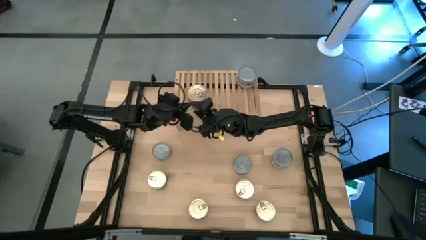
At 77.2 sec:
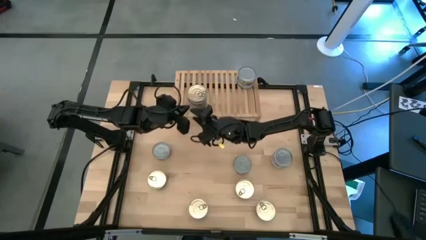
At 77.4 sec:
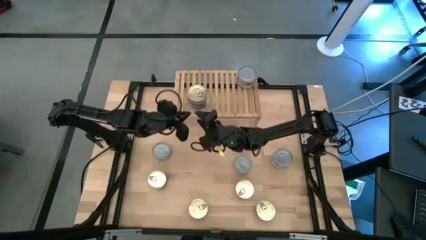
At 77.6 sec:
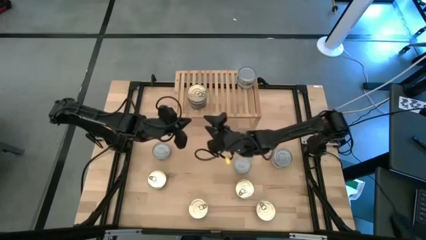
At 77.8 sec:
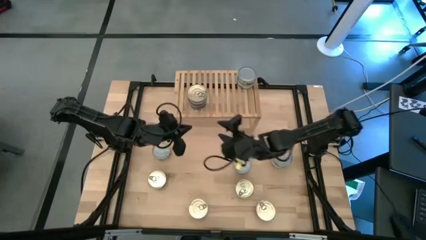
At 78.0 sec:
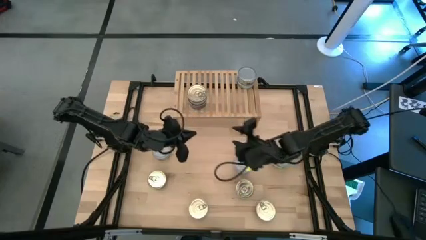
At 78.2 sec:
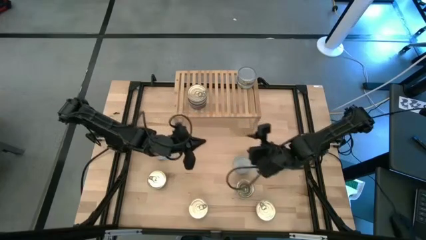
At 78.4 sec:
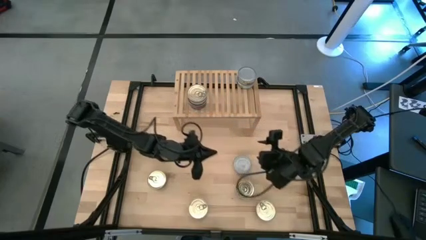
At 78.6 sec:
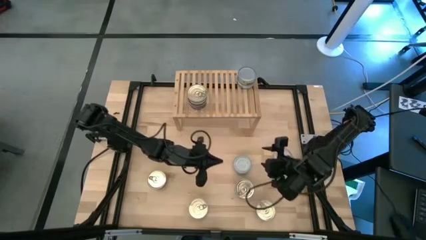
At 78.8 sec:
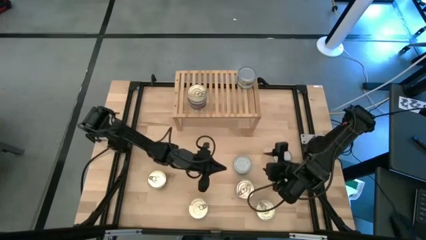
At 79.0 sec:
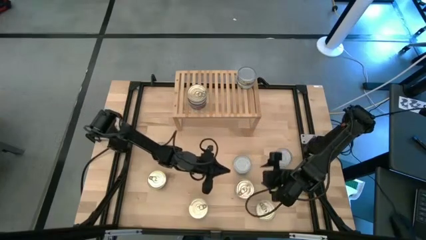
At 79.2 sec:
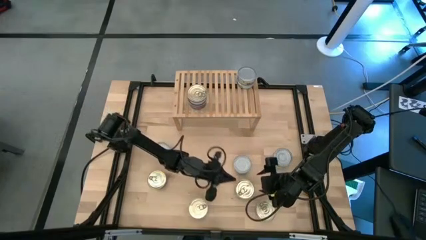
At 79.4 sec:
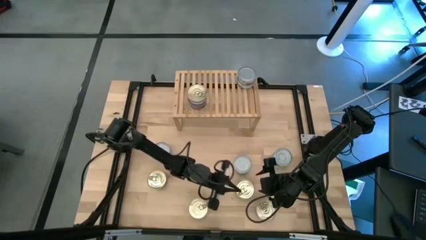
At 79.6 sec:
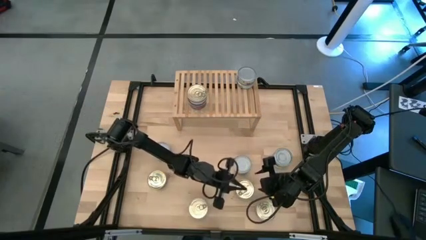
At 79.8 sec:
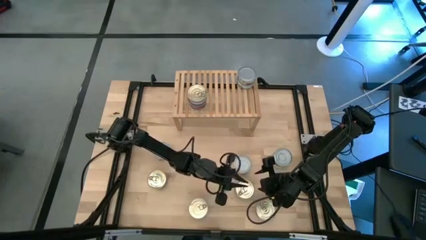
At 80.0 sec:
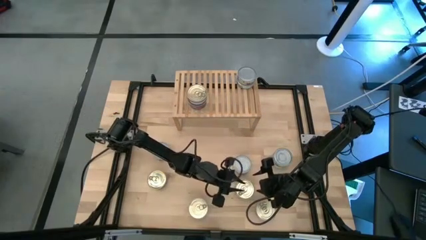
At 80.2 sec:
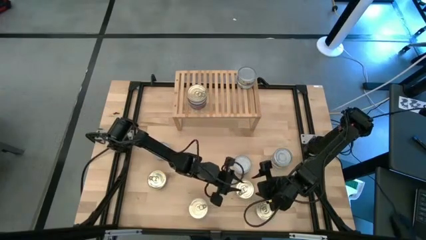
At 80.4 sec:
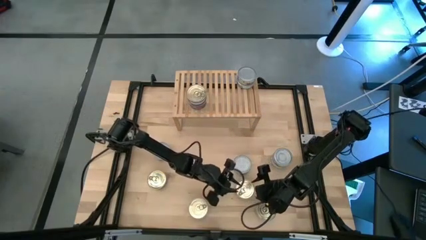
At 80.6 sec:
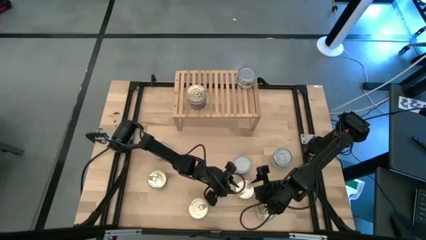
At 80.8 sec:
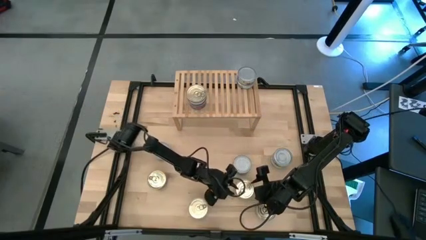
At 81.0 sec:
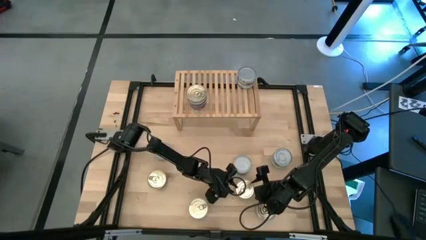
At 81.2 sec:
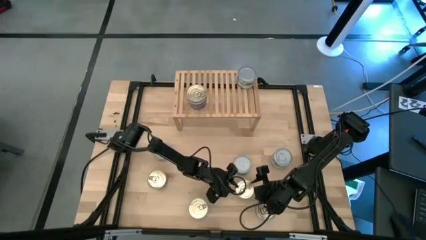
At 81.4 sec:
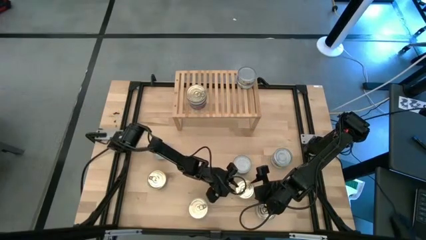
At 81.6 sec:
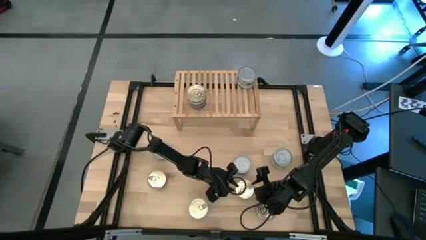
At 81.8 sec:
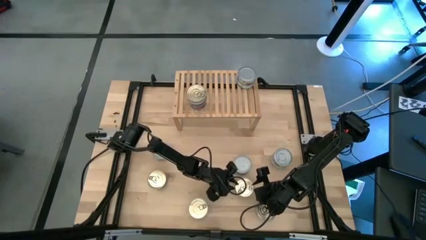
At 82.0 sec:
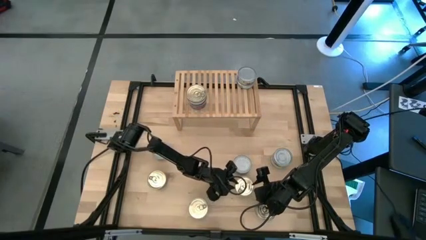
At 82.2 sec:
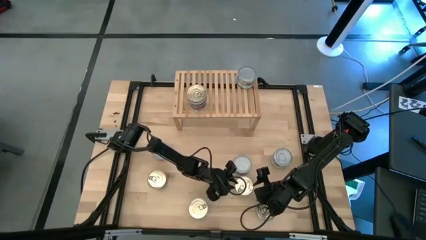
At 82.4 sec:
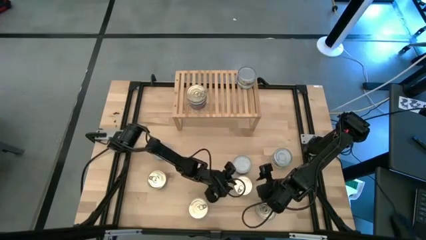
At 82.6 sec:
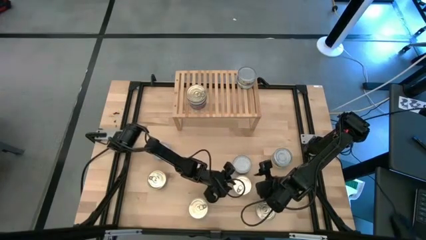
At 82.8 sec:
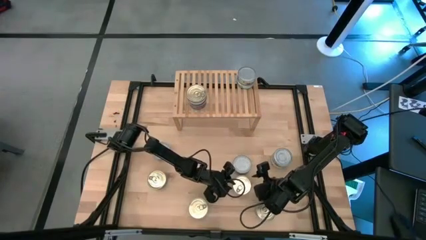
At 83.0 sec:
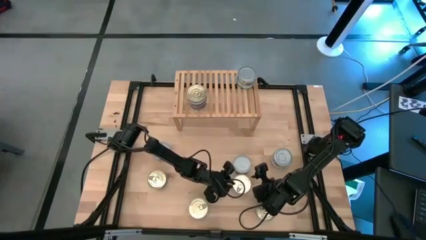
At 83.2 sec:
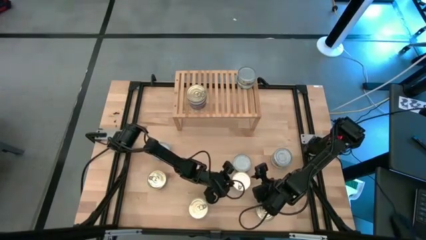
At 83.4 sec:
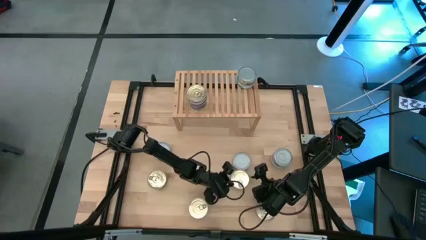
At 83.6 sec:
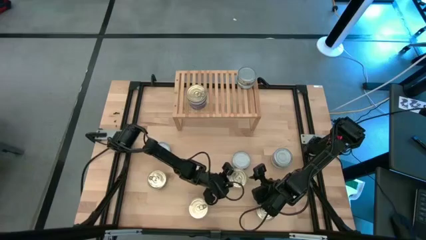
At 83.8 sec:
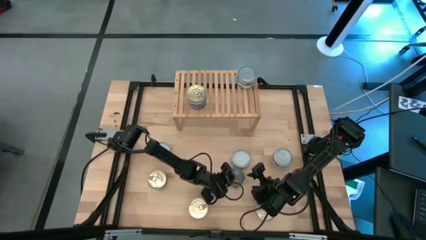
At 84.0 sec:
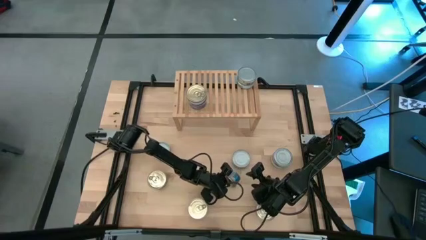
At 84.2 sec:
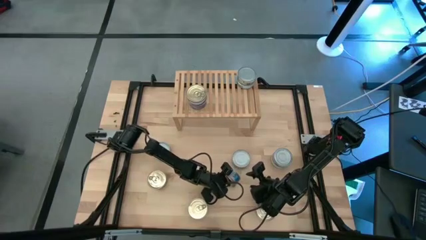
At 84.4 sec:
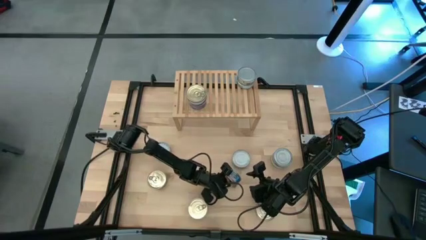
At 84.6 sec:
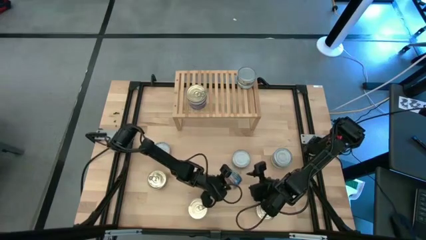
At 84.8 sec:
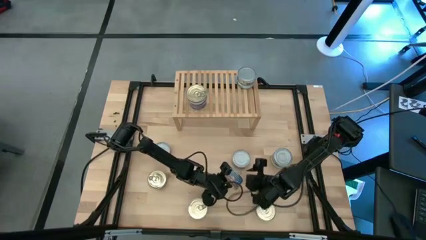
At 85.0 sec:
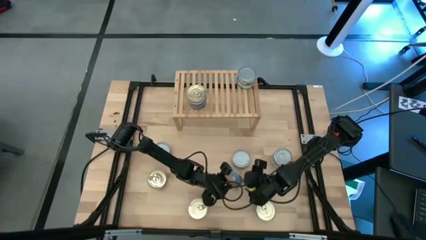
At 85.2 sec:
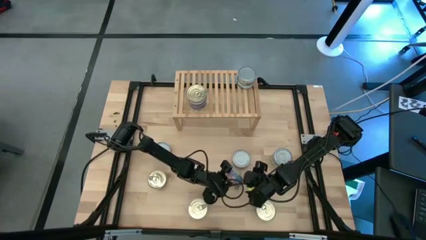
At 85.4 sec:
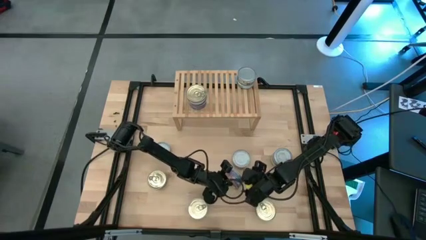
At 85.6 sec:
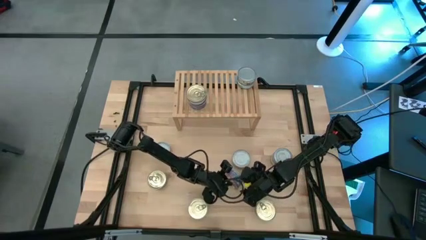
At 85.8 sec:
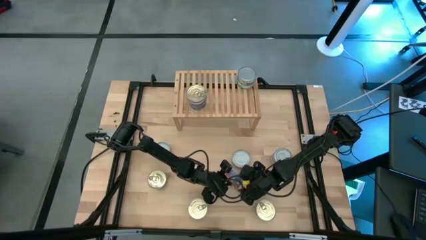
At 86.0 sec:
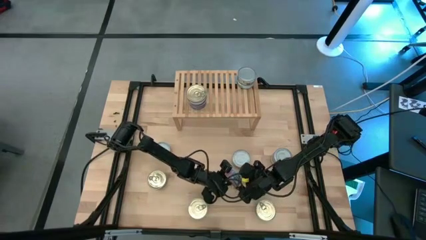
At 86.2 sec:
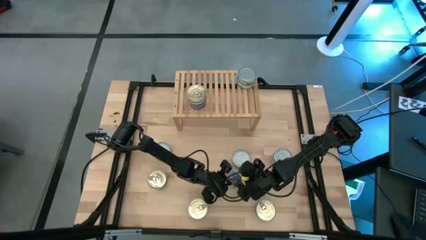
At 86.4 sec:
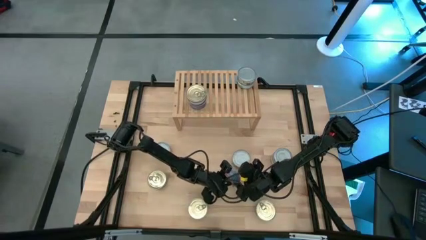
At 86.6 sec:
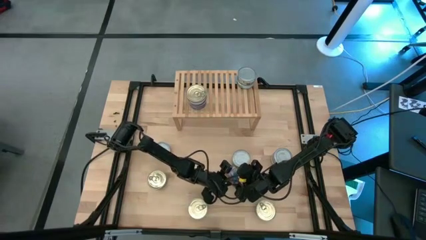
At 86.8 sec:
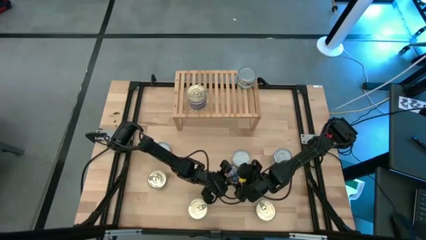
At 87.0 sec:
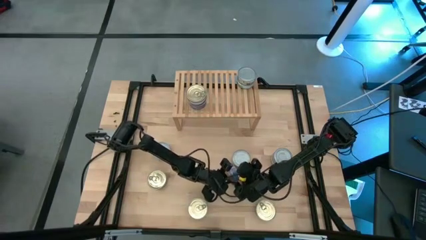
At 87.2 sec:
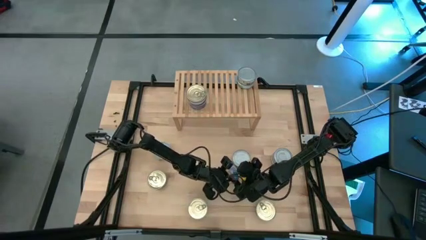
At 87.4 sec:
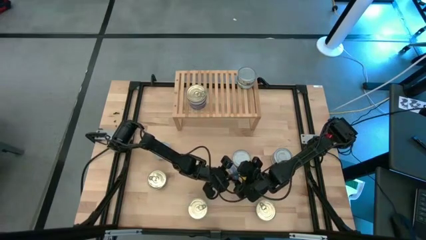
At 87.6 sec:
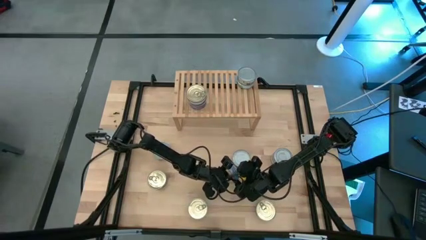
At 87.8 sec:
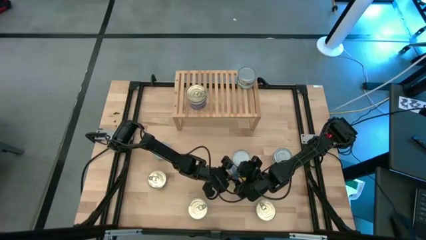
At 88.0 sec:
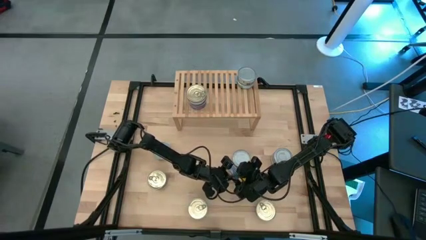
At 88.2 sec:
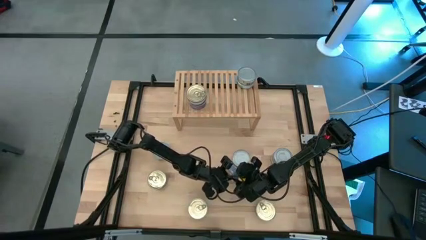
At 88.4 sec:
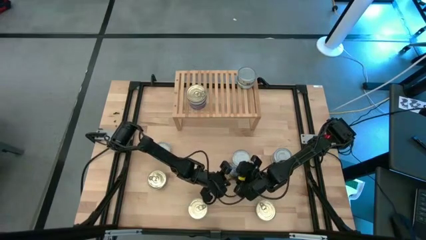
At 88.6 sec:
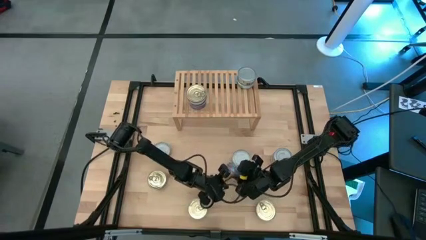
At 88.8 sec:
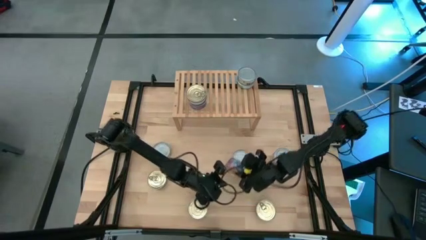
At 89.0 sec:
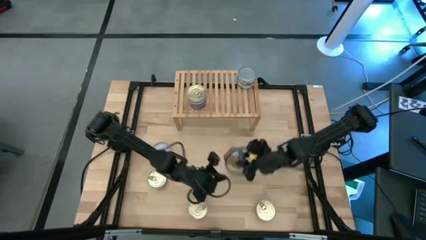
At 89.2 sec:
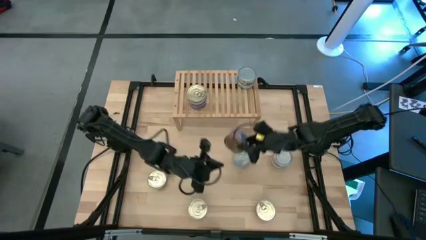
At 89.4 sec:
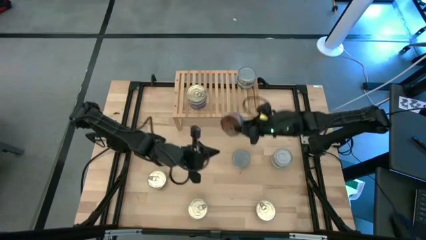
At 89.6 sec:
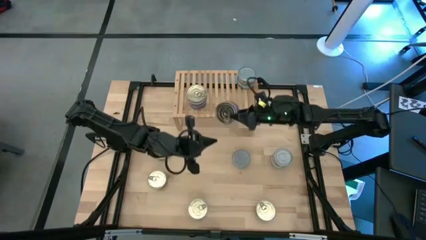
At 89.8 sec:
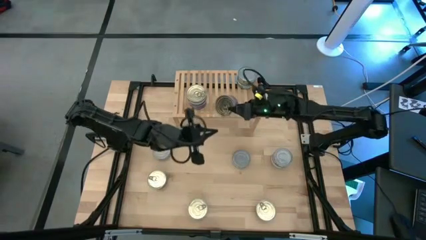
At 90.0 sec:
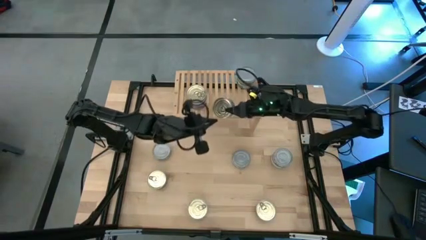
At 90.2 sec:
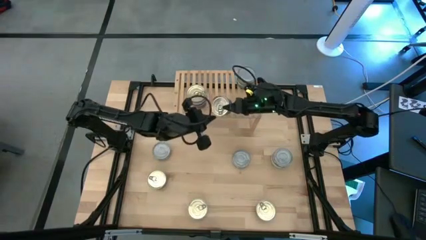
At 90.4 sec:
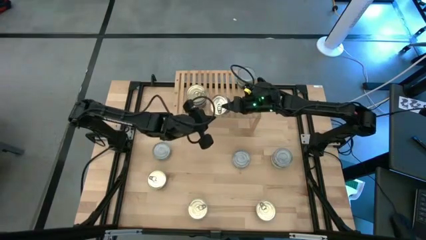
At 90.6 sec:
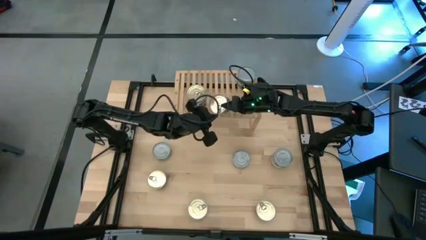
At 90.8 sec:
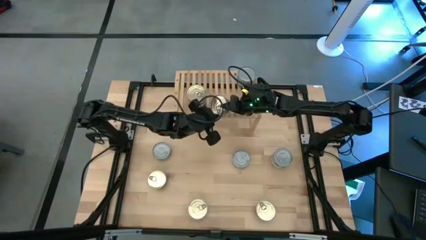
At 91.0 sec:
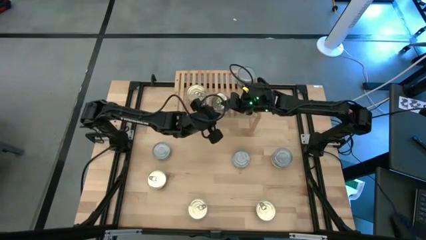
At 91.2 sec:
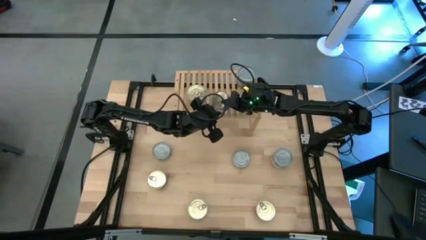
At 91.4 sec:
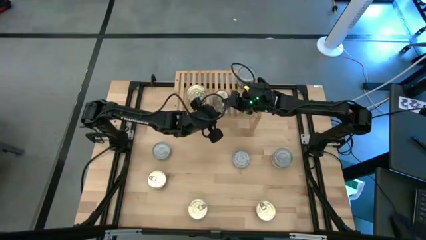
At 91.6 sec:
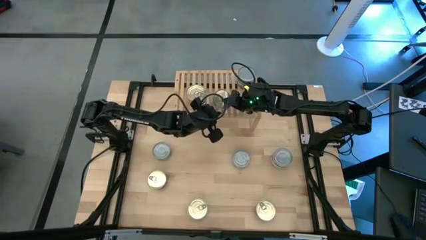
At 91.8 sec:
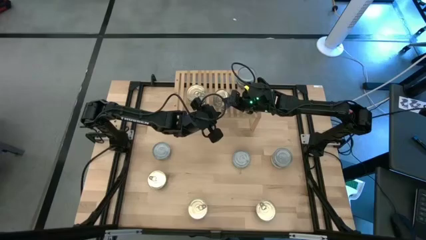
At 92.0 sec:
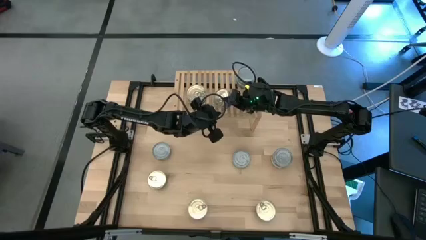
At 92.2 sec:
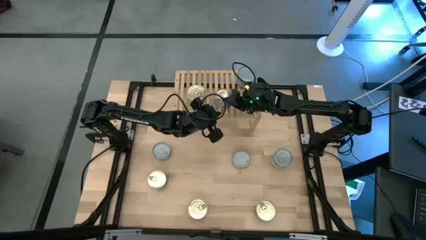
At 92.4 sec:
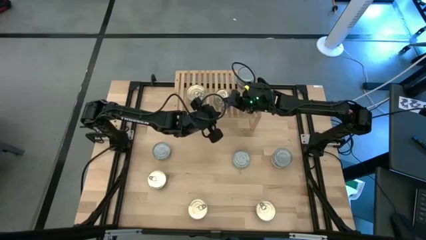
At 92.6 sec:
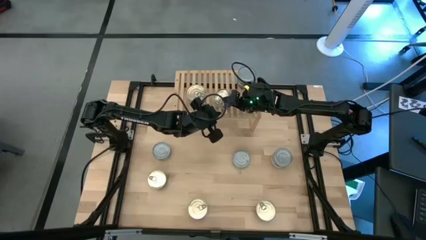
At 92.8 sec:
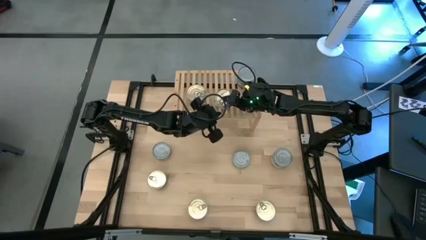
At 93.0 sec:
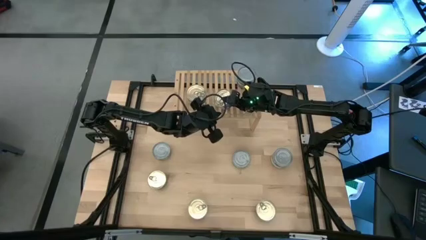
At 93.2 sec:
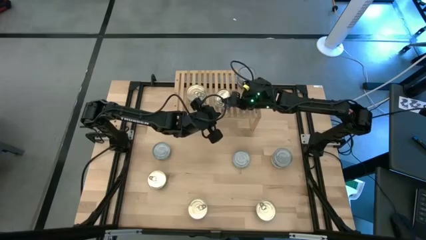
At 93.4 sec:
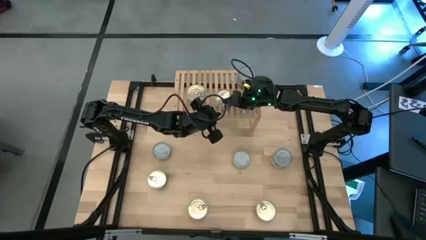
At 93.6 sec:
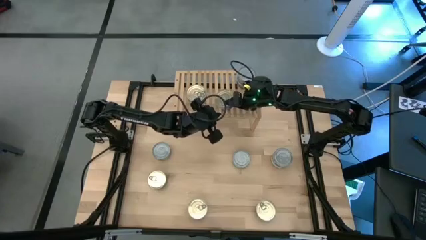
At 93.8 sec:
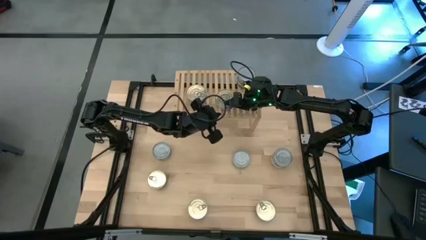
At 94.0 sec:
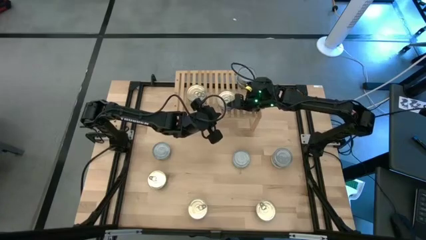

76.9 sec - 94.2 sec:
Task: Stack canned seafood by type on shelf
Put the blue-pink can on the shelf
